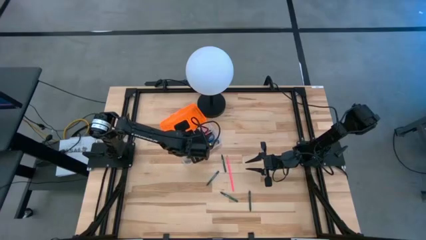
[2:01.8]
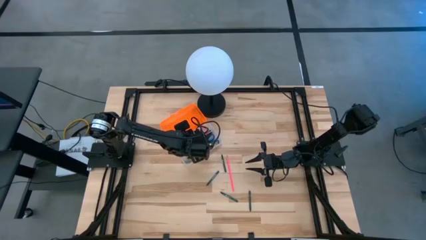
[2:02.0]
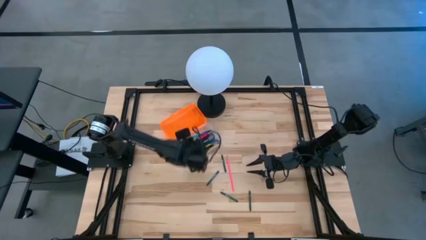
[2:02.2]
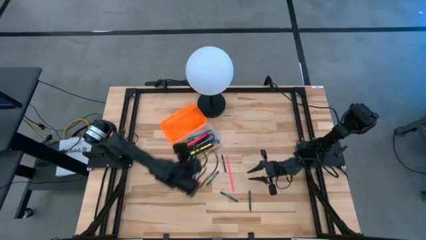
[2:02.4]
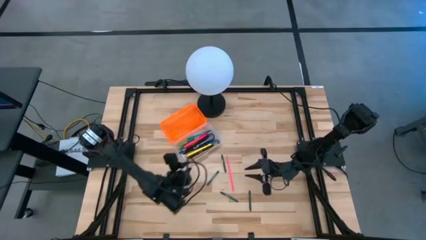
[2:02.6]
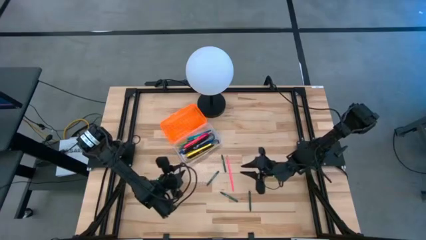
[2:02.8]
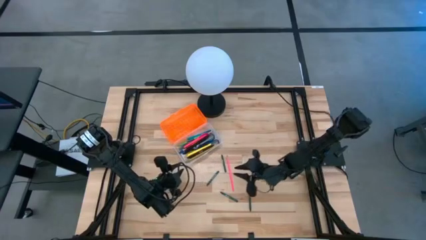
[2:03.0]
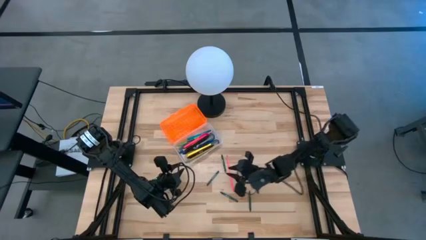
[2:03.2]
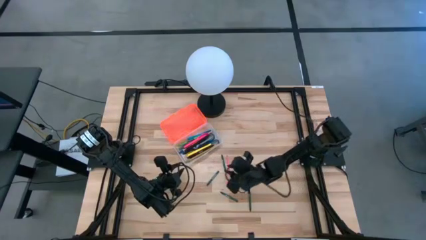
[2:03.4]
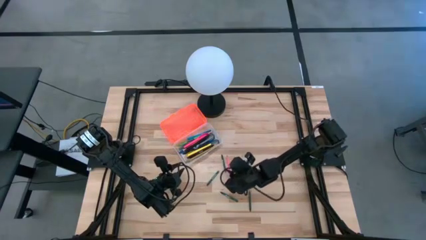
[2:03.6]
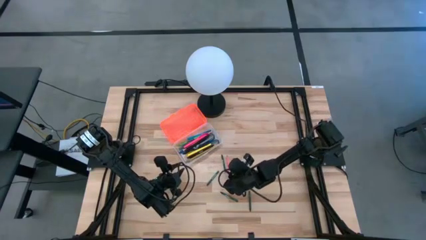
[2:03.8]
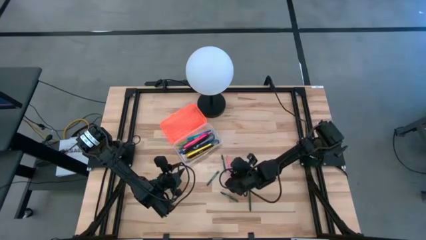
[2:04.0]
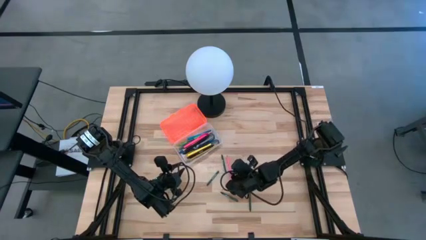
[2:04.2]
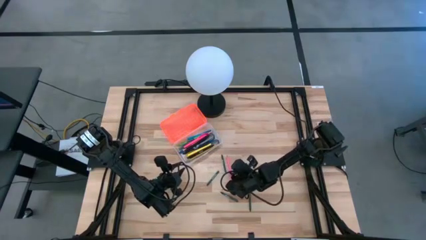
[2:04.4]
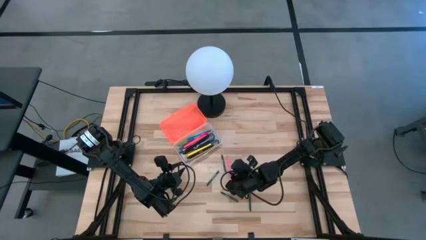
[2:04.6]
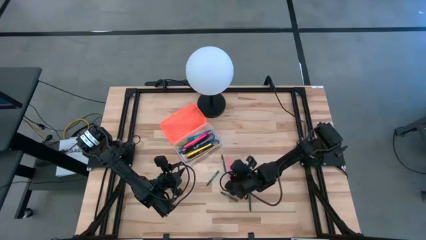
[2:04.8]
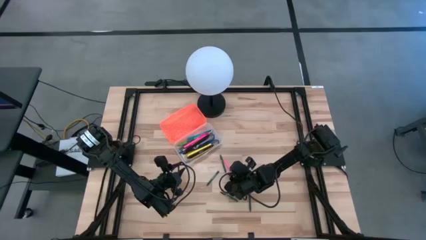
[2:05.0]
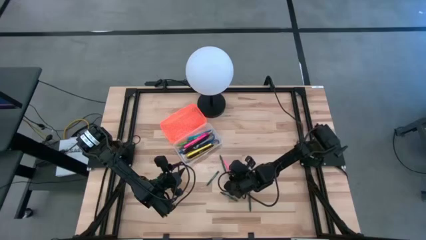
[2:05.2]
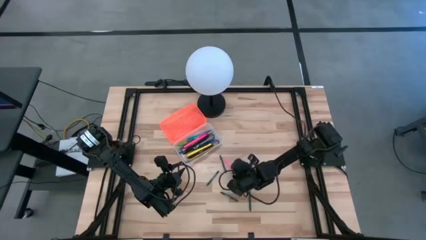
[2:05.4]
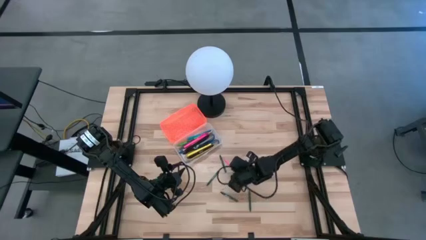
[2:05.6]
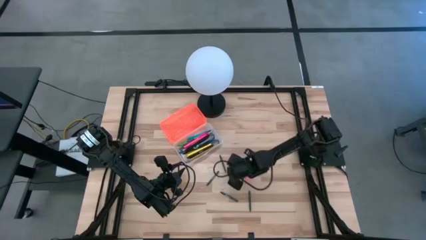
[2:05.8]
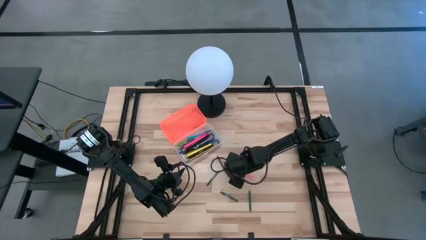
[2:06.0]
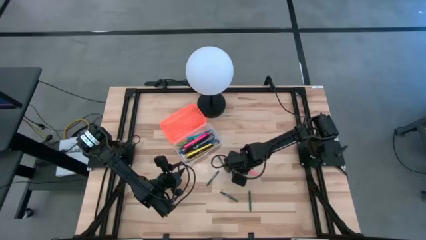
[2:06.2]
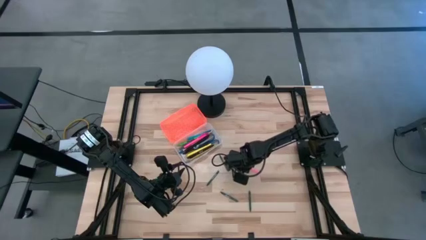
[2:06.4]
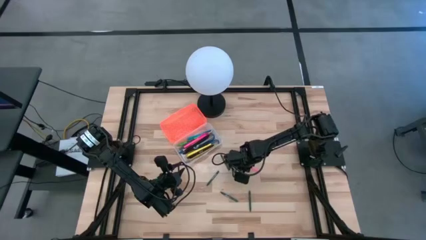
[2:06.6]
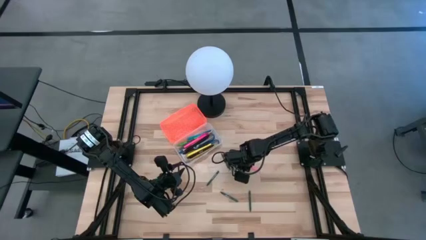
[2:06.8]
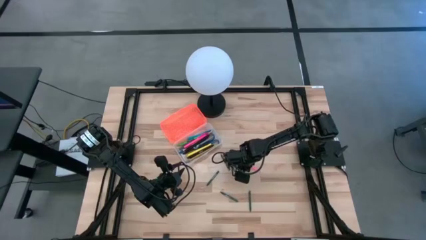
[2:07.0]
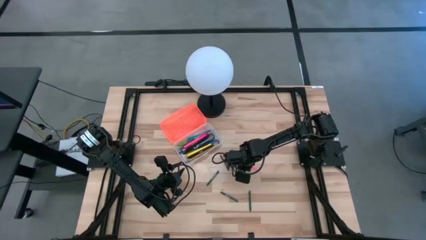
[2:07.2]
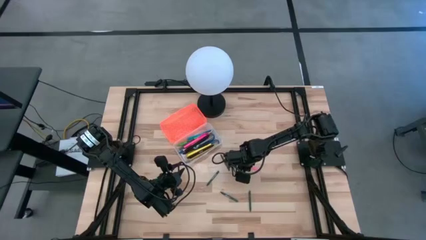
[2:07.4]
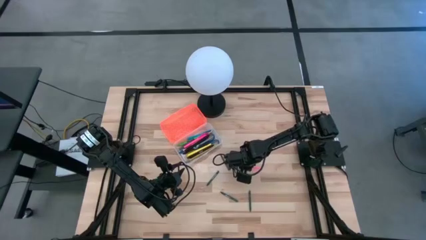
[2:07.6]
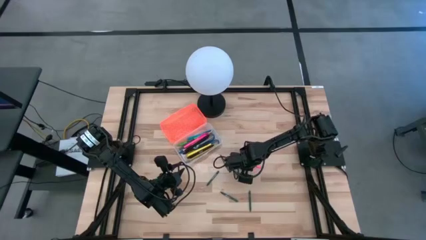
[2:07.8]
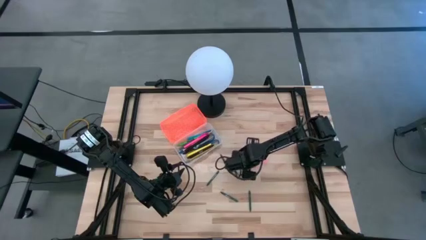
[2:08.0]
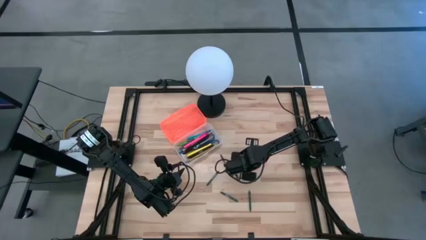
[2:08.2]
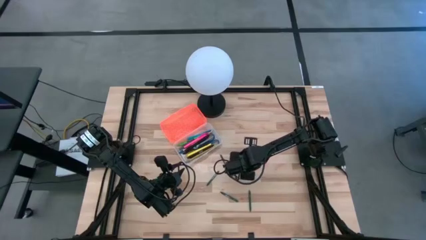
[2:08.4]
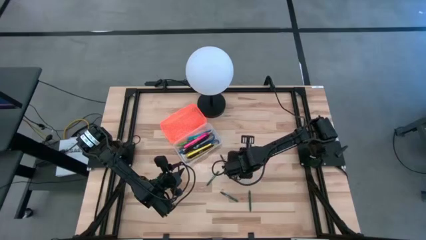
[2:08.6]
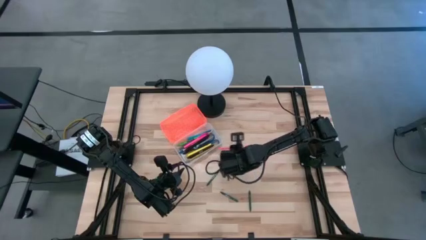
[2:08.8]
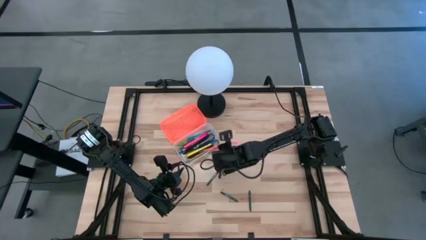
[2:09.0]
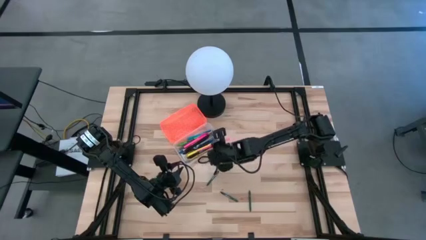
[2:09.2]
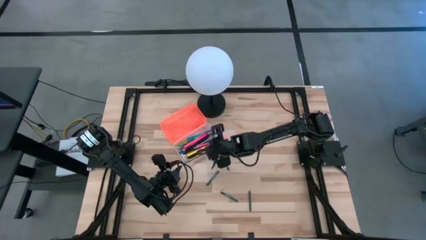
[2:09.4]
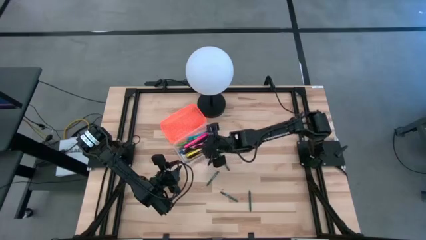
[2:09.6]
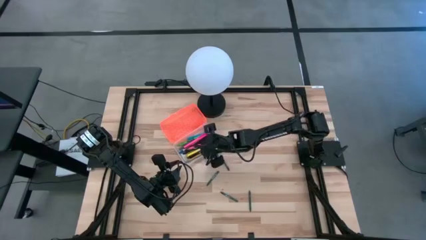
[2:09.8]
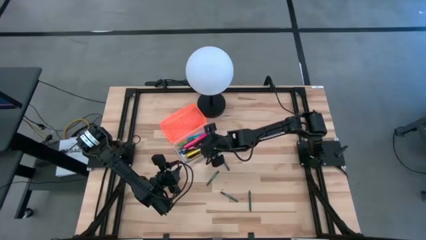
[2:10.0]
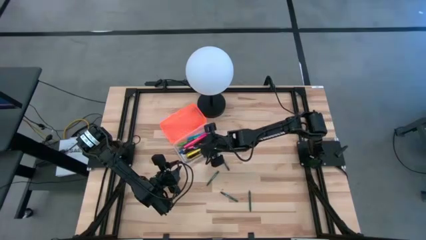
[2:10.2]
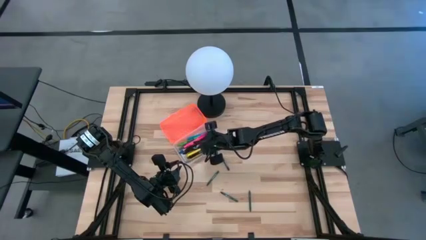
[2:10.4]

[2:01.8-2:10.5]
Task: Pick & place school supplies into a supply box
Put the pink pencil into the orange supply box

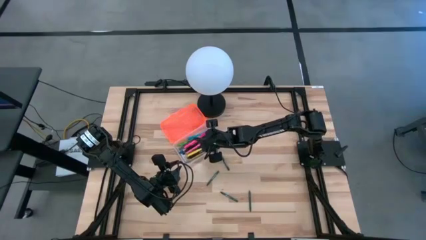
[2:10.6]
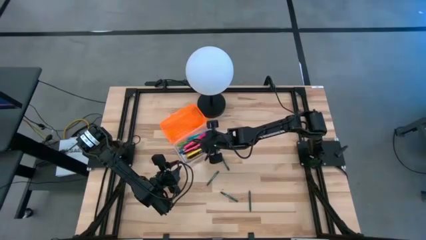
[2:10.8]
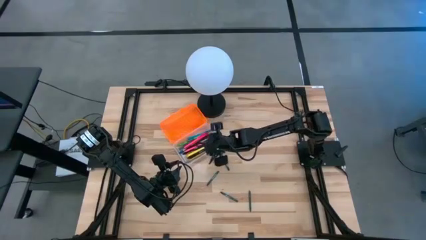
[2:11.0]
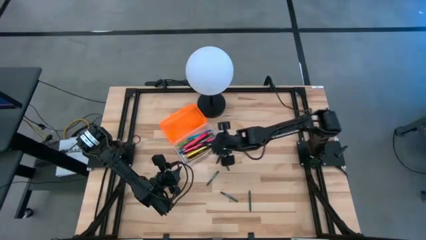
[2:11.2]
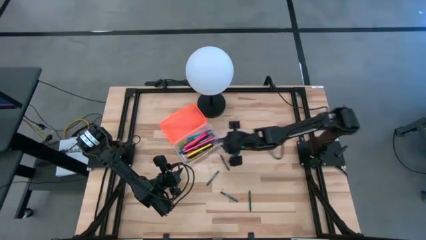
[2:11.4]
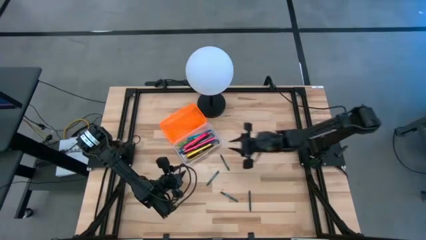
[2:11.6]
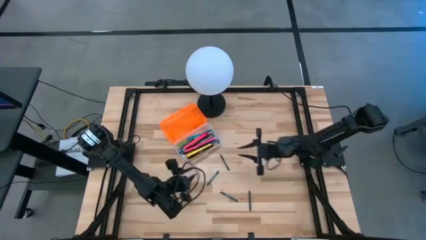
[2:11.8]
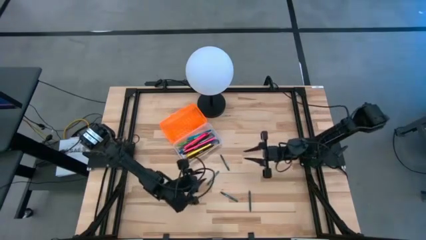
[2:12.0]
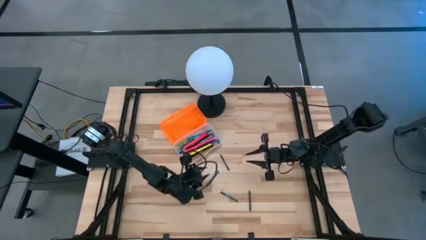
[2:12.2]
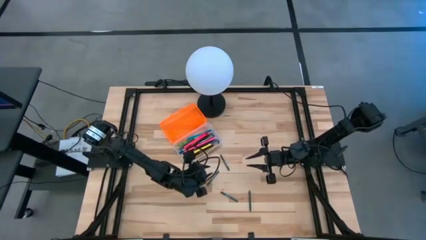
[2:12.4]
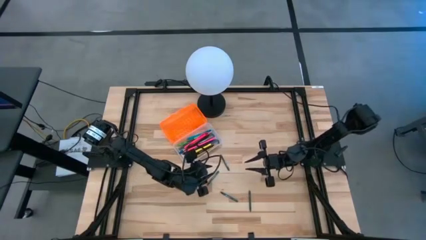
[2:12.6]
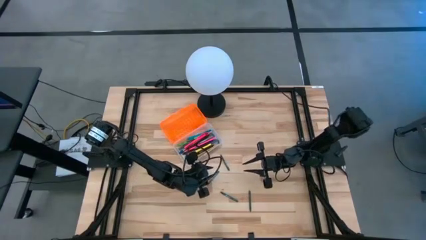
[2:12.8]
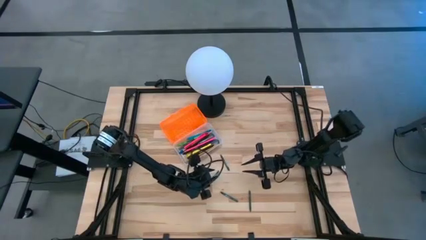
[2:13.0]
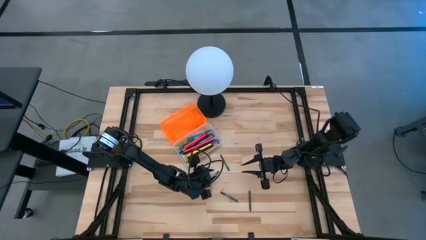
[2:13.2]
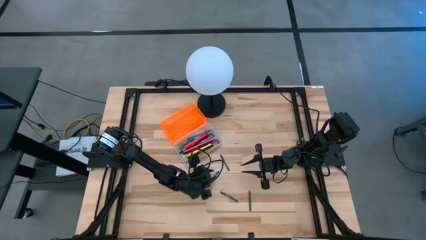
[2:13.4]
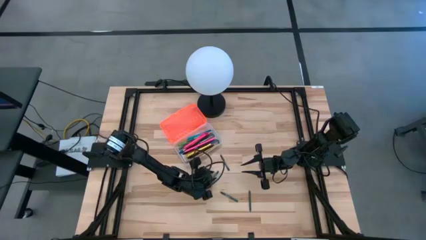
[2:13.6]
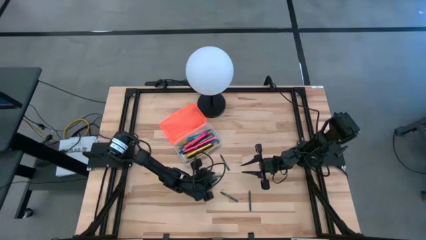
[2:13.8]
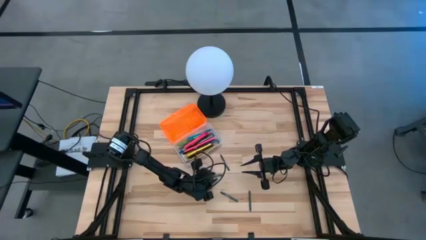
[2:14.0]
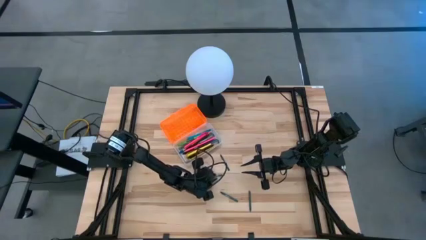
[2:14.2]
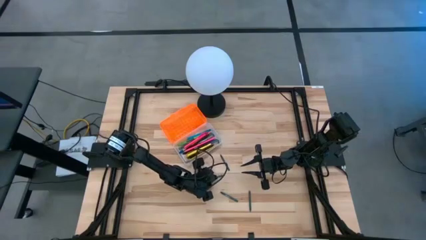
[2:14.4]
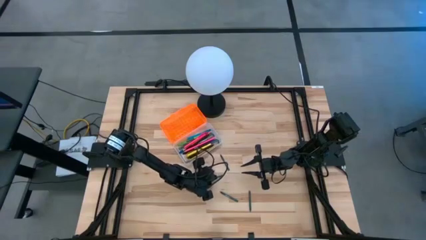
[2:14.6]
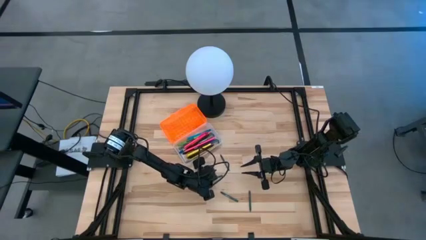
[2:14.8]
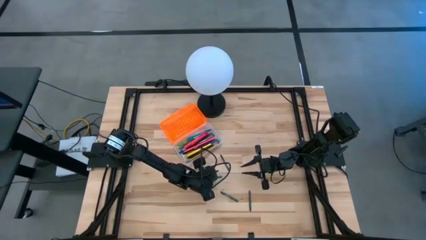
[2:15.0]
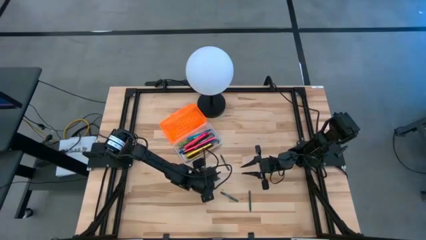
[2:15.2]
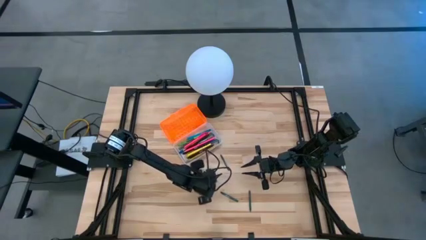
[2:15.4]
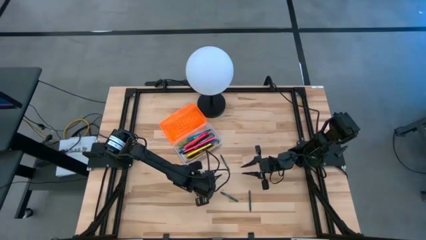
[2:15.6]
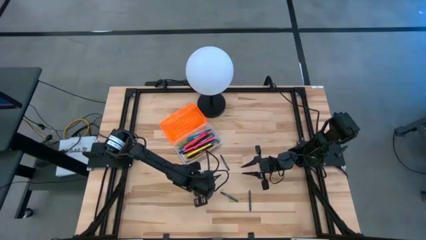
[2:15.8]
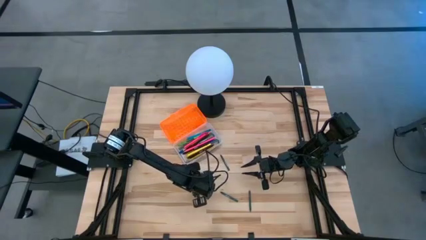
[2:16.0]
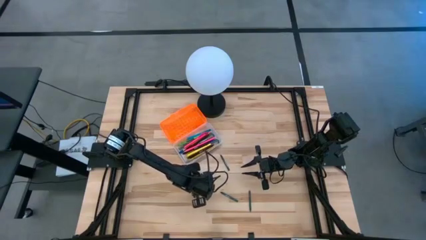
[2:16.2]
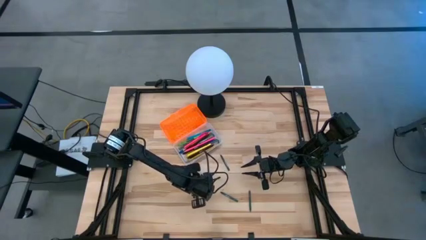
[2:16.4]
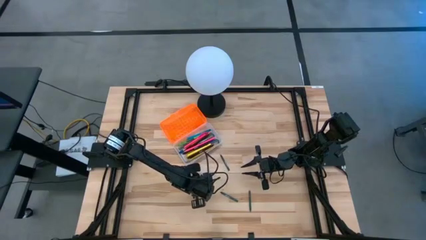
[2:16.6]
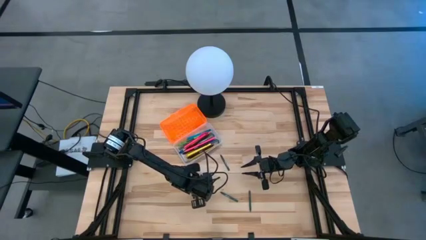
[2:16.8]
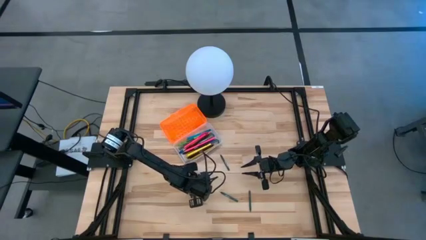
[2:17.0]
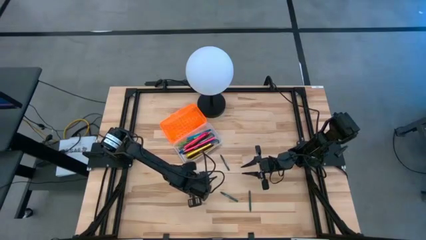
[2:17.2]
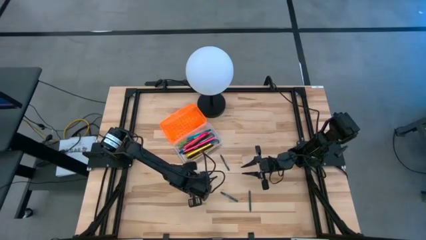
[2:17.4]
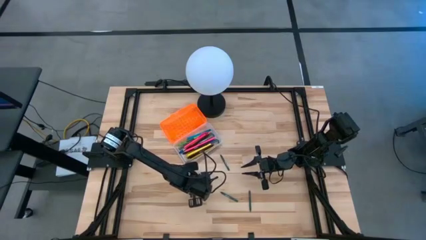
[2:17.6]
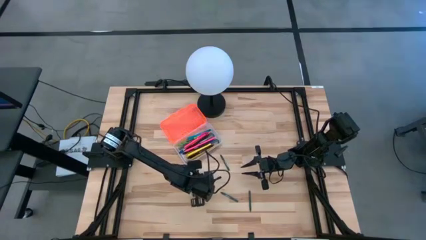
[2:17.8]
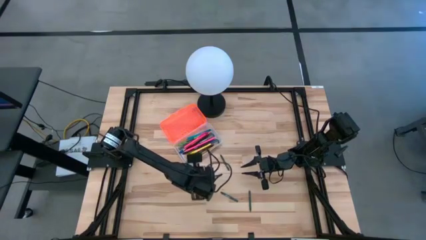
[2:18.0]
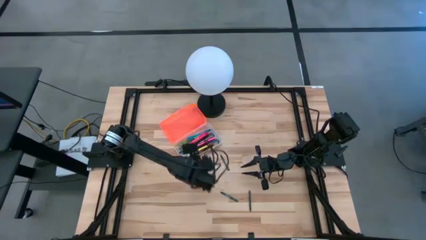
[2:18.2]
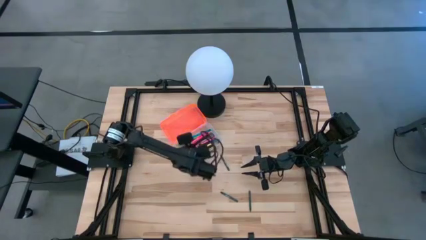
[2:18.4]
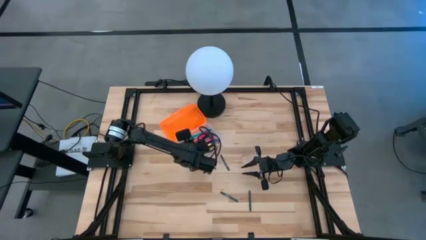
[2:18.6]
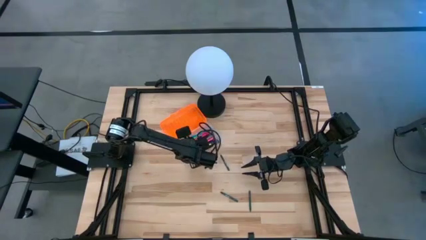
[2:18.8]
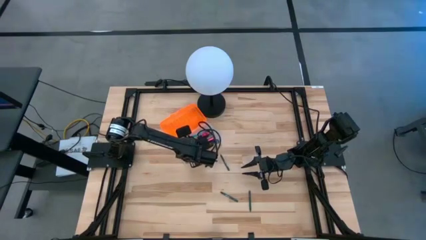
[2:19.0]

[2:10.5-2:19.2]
Put the middle left green crayon into the orange supply box
